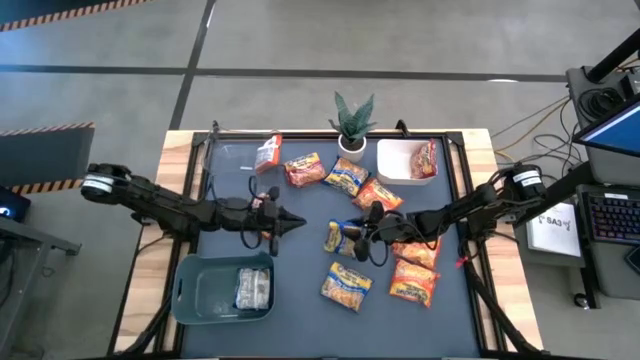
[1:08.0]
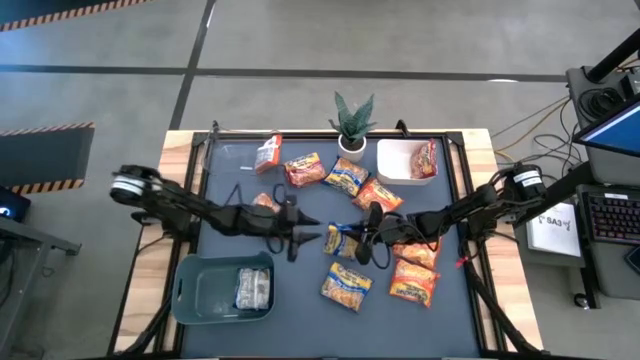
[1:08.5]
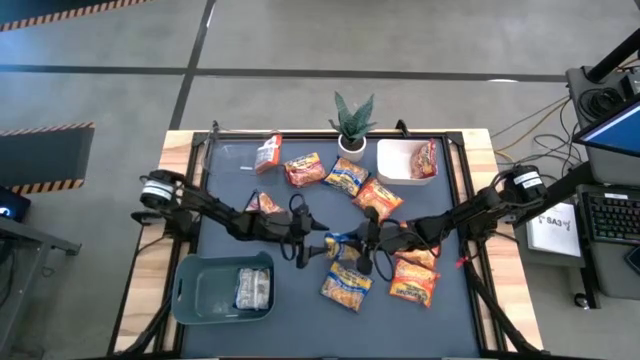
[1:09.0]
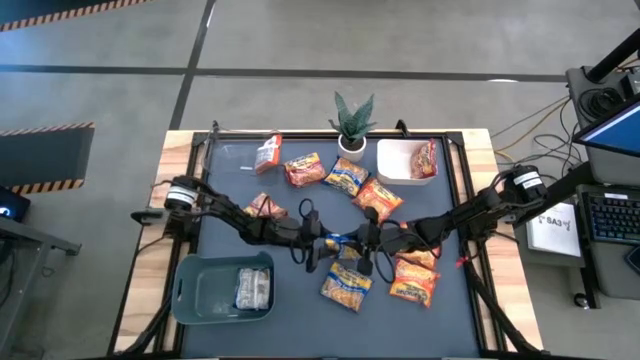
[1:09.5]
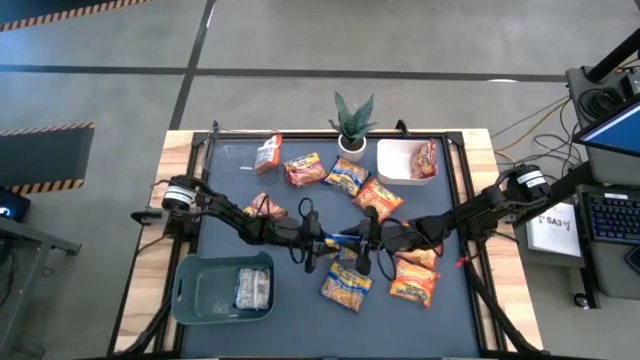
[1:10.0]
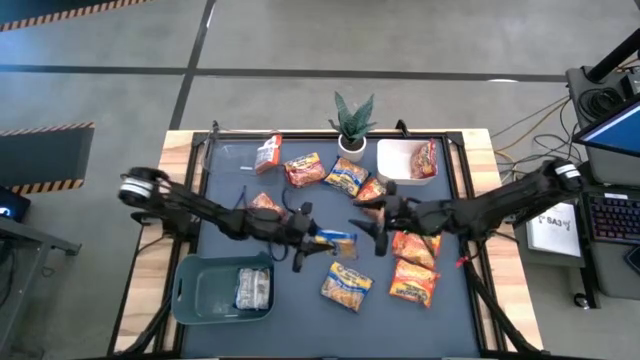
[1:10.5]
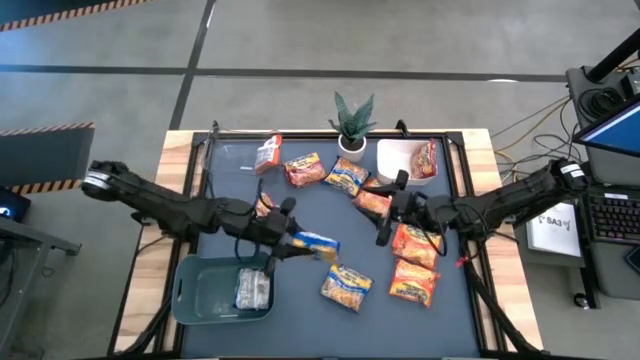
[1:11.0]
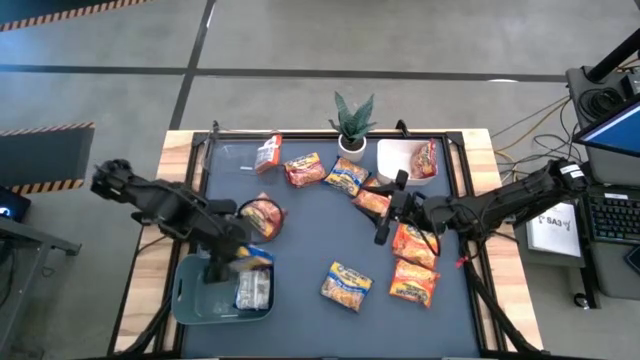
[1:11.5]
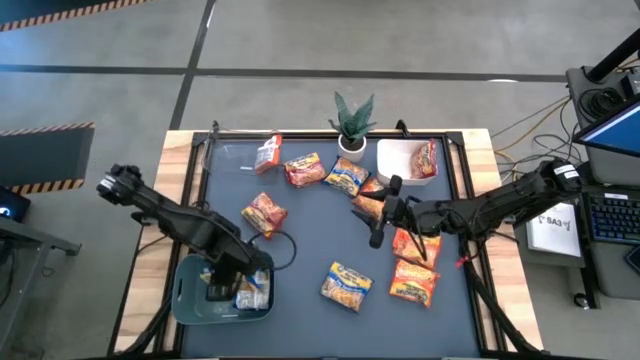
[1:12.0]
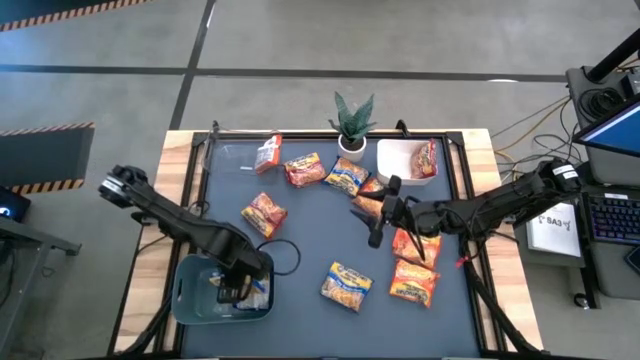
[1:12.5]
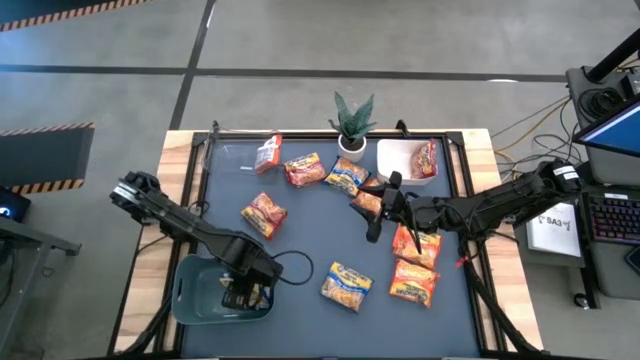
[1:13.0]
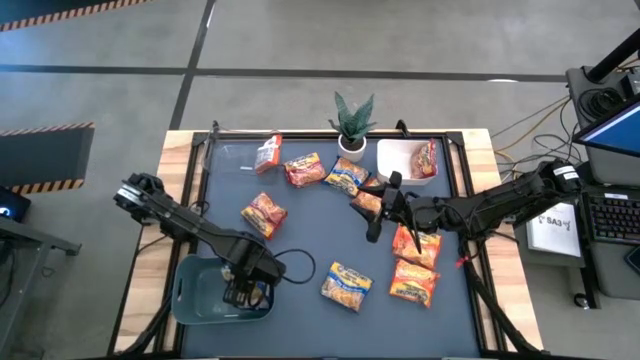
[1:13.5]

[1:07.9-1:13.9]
Task: Sort Maruchan noodles
Put the blue noodle pack into the blue bin

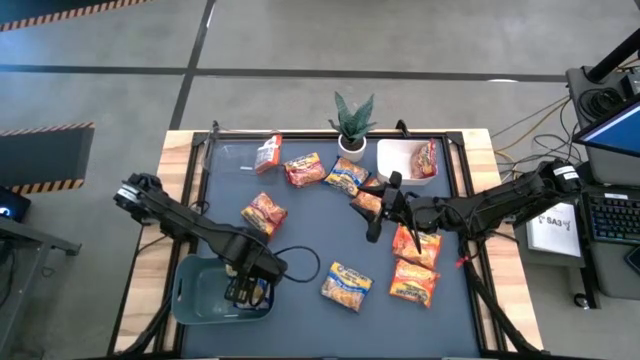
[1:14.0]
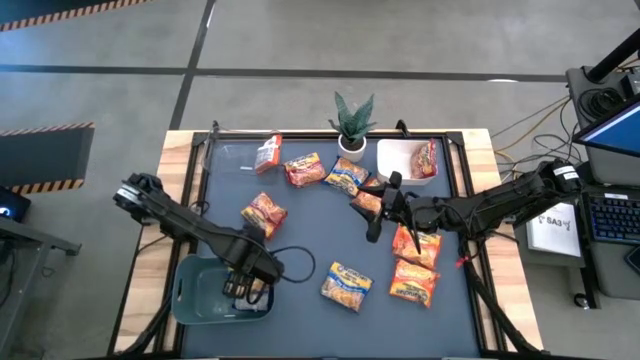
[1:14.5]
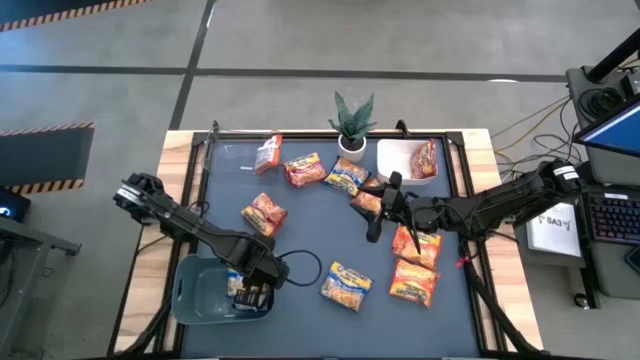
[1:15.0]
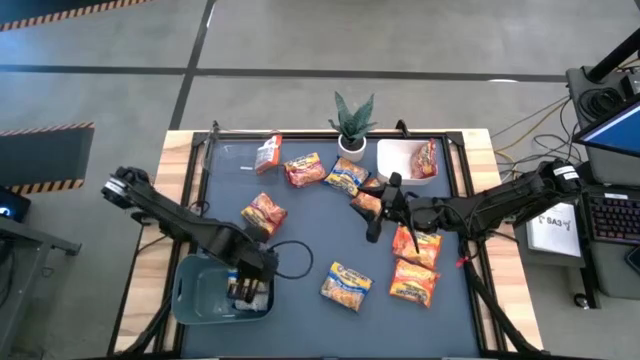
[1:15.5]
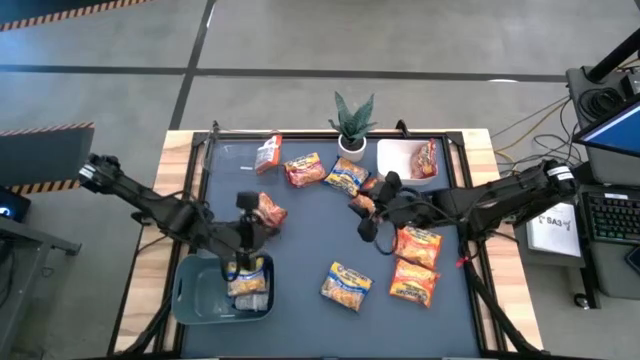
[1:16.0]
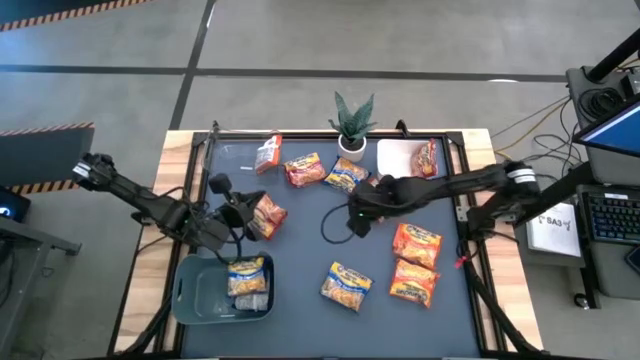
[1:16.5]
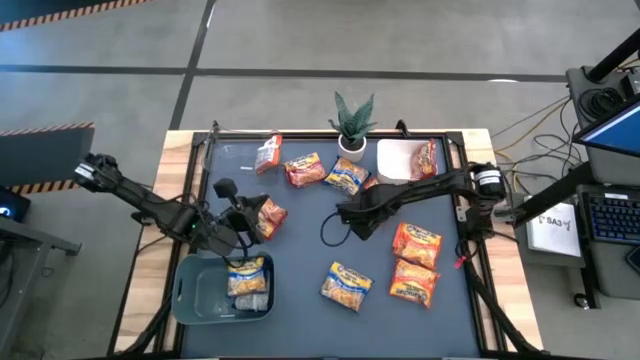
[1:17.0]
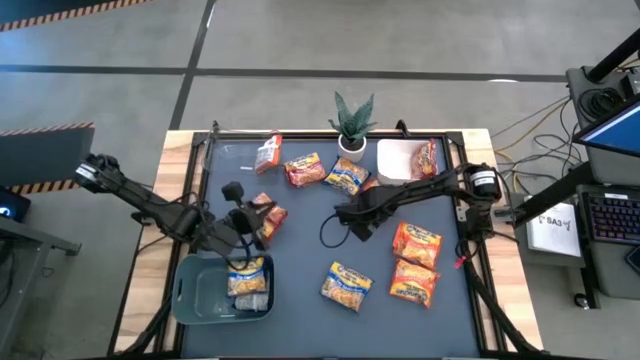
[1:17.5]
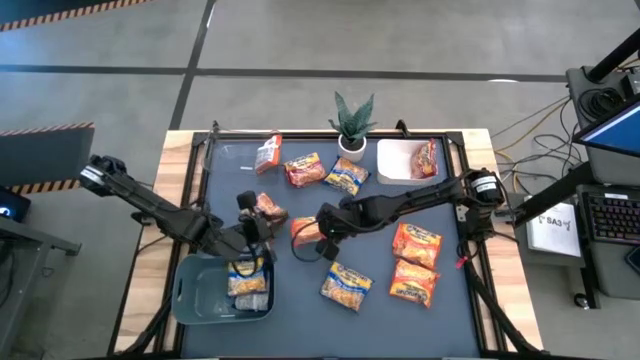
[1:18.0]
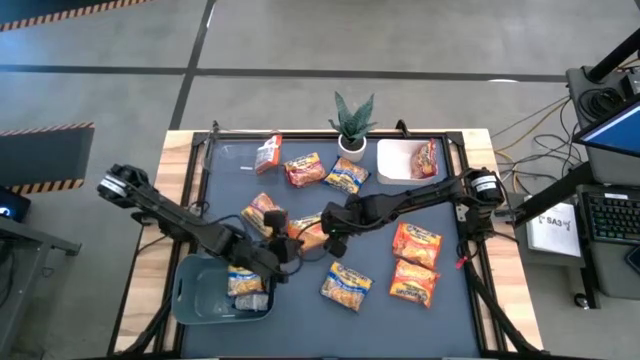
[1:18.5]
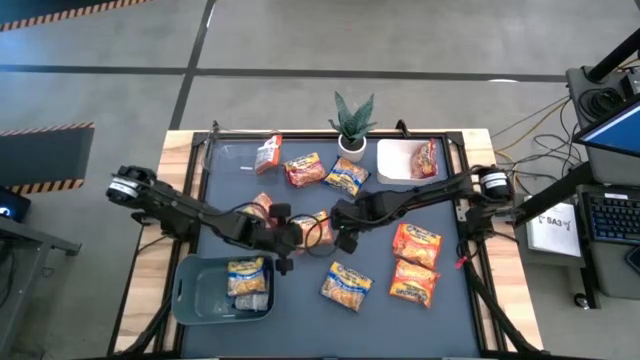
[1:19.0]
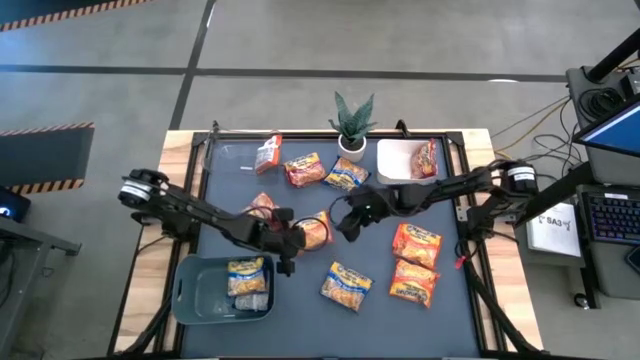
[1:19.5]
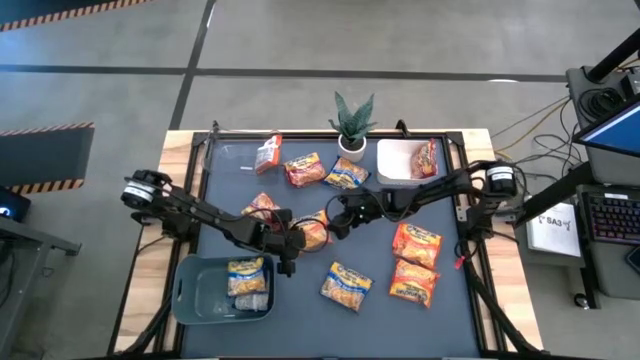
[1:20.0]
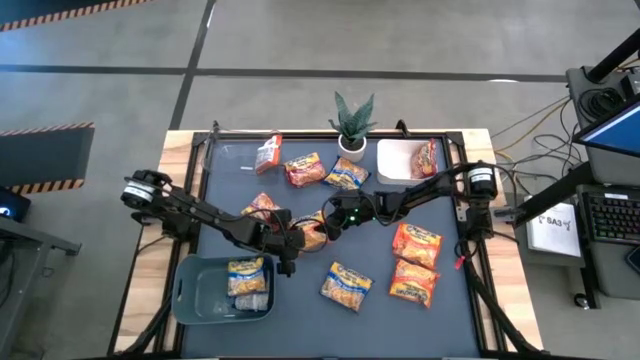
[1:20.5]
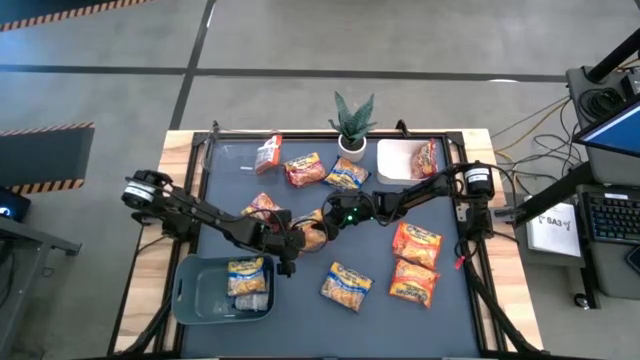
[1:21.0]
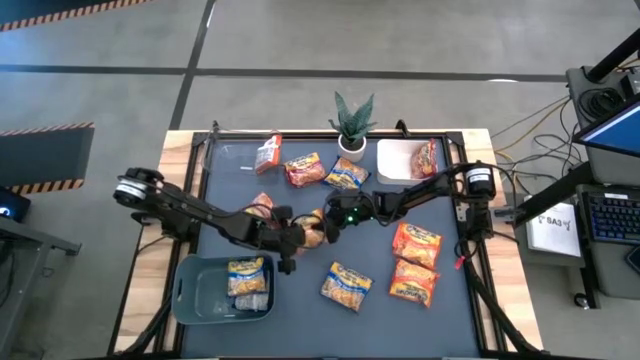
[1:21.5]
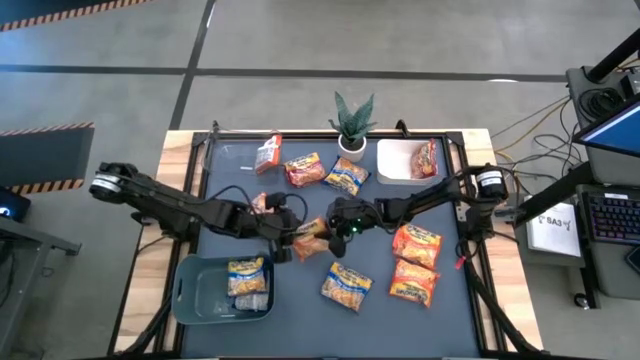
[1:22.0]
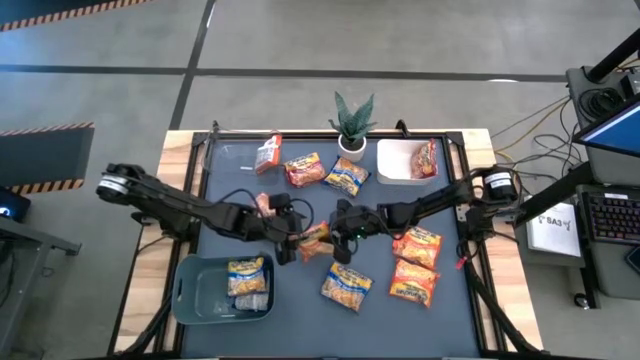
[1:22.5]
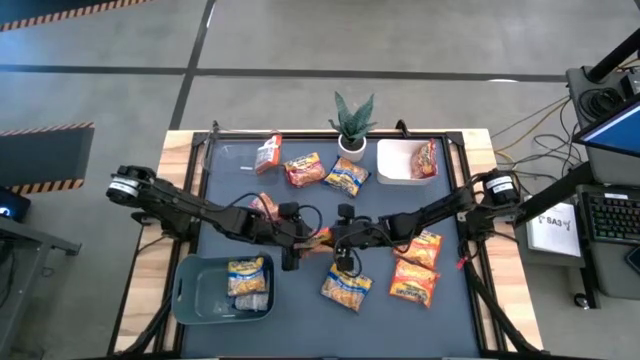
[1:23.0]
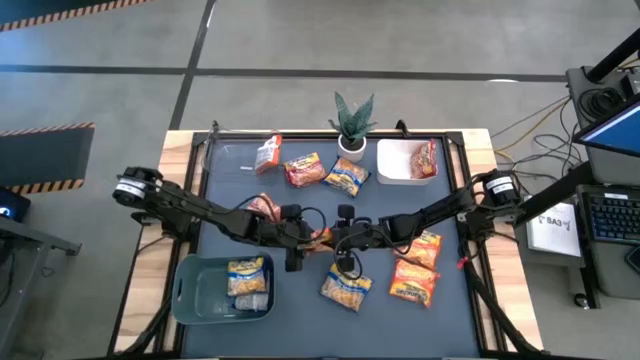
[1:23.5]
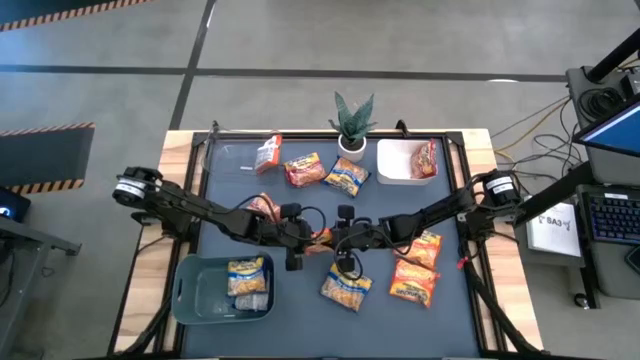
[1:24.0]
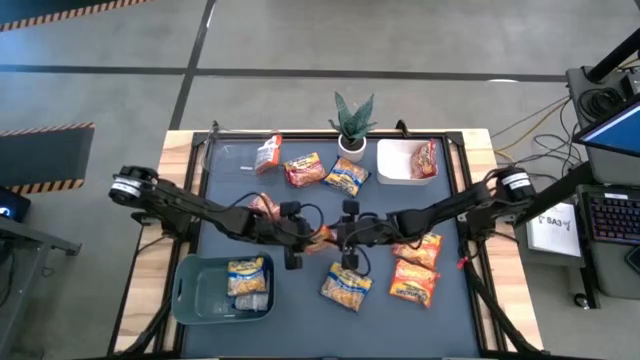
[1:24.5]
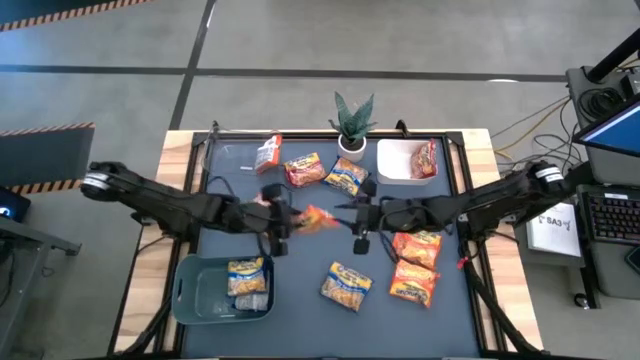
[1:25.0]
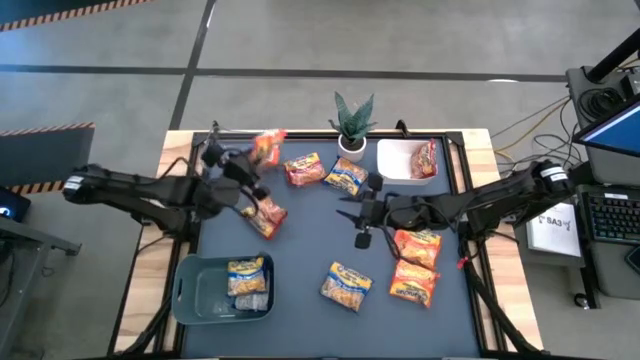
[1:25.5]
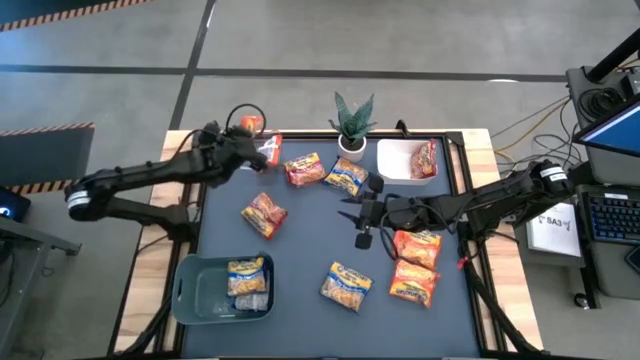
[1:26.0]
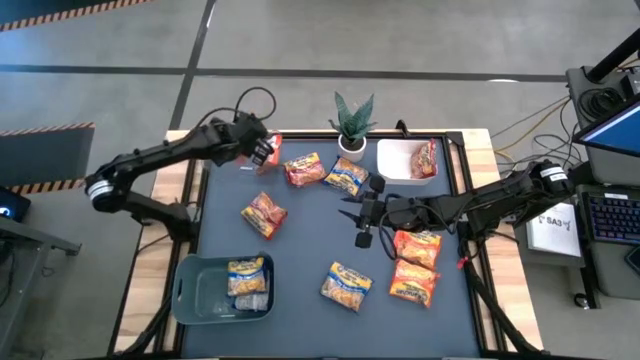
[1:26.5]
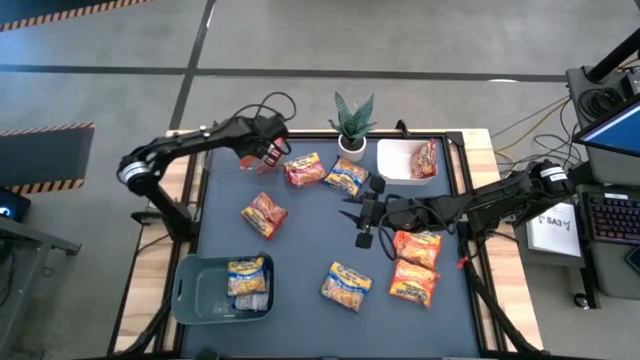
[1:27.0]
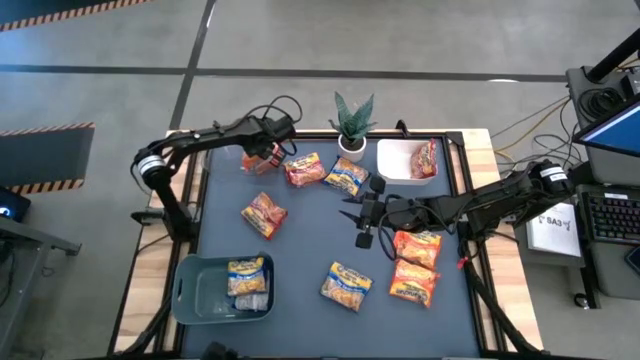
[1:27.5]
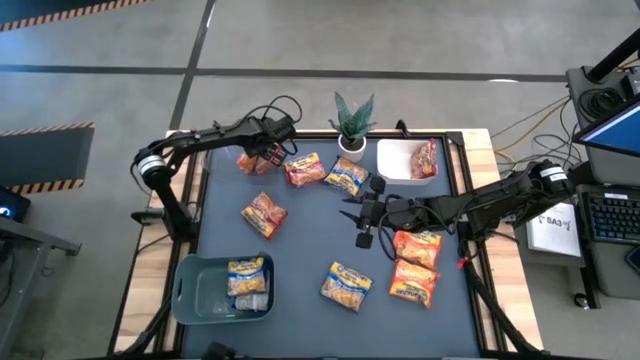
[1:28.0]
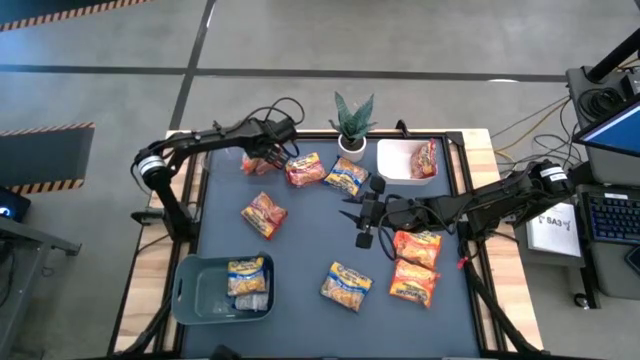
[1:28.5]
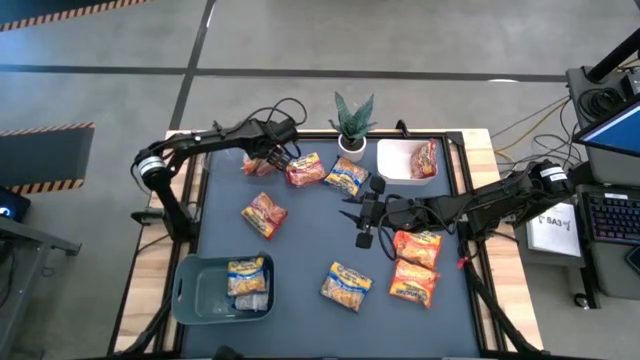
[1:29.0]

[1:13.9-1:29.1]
Put the orange noodle pack into the transparent bin

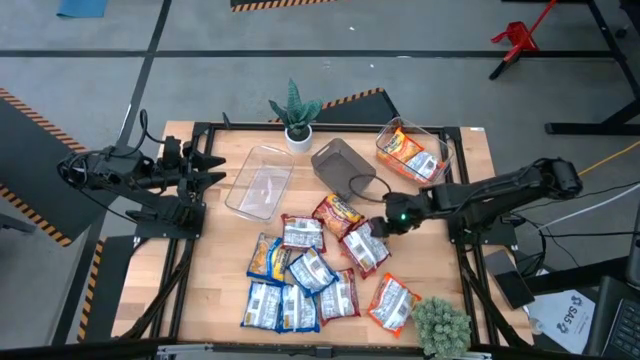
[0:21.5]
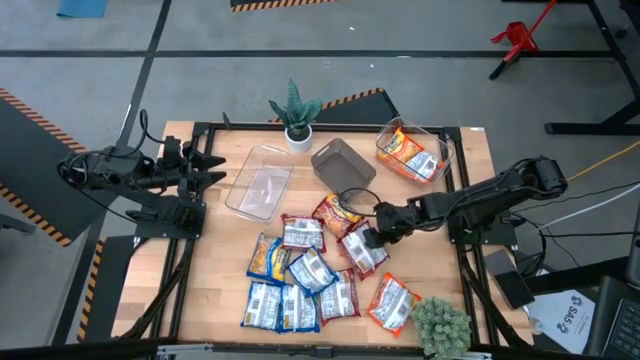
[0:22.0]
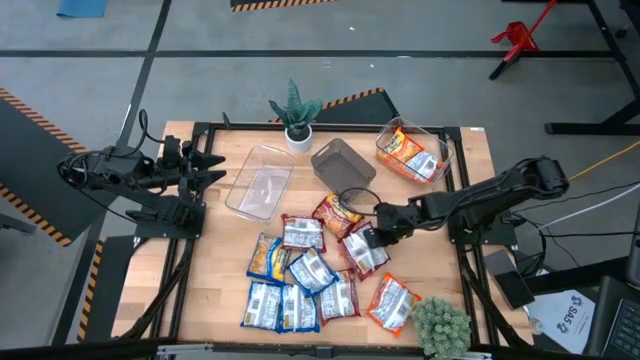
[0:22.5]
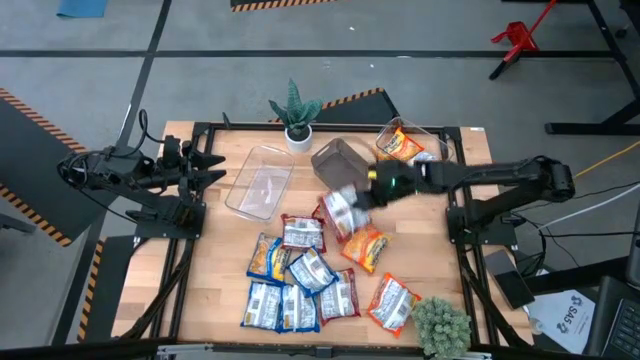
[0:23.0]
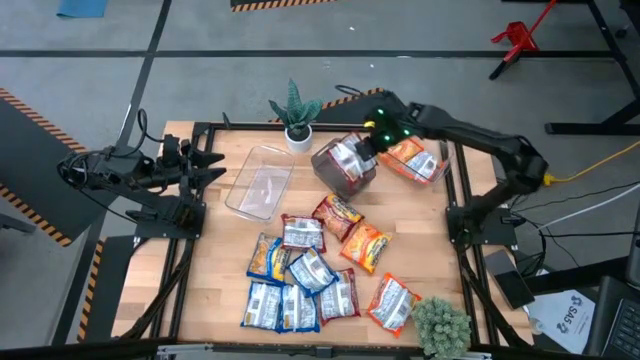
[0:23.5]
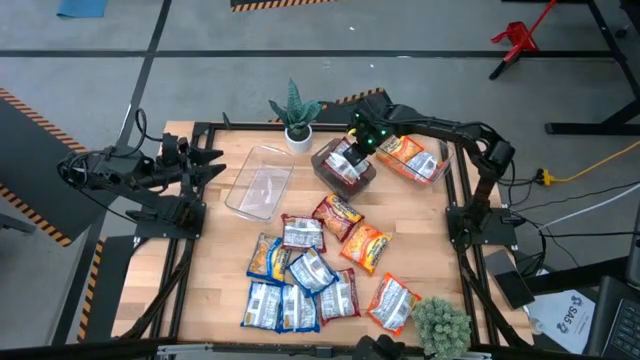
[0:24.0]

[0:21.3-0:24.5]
Task: Sort Maruchan noodles
Put the red noodle pack into the black bin
